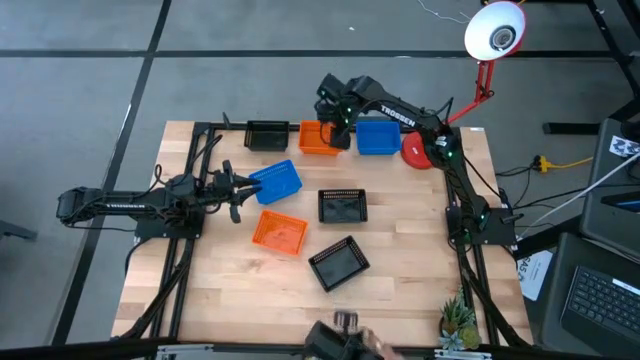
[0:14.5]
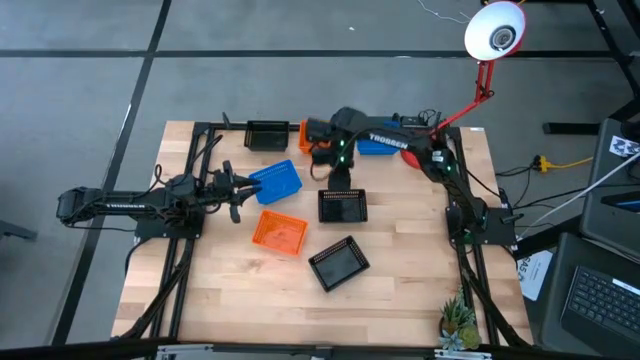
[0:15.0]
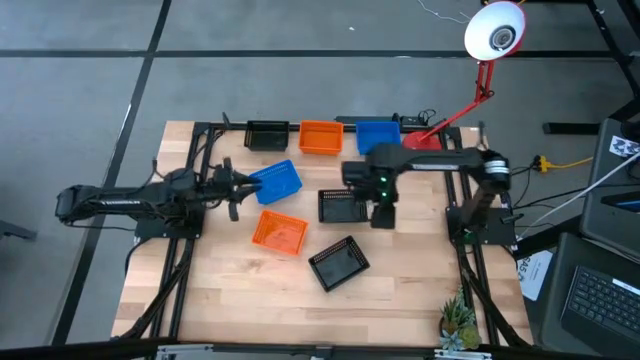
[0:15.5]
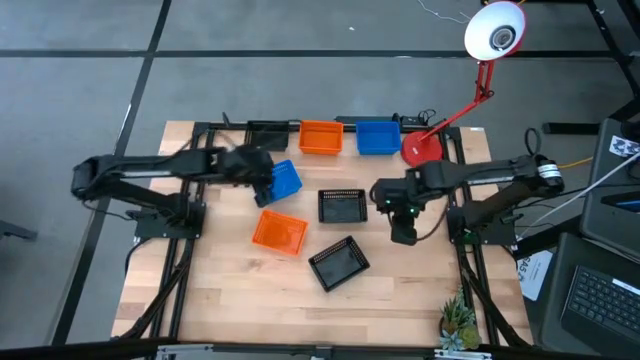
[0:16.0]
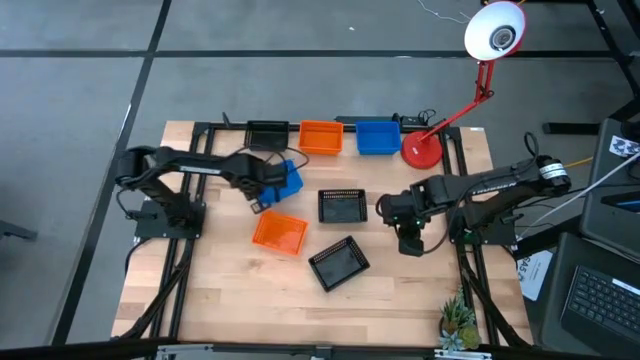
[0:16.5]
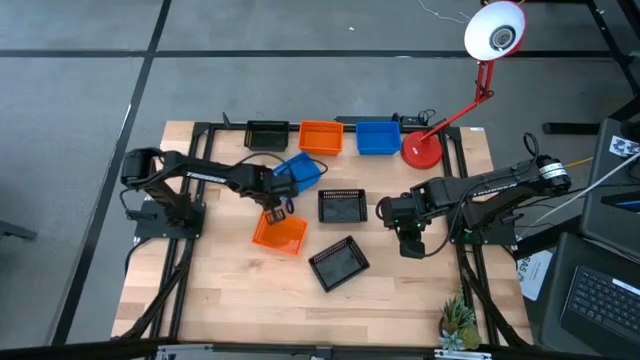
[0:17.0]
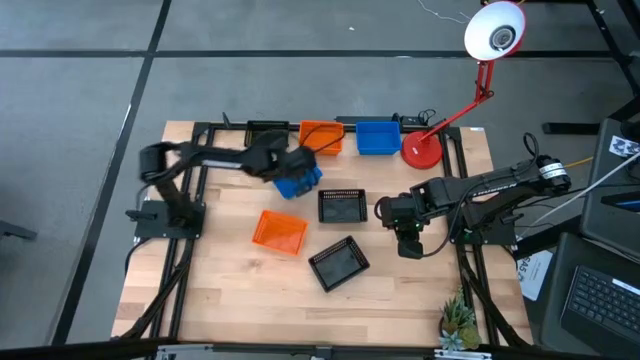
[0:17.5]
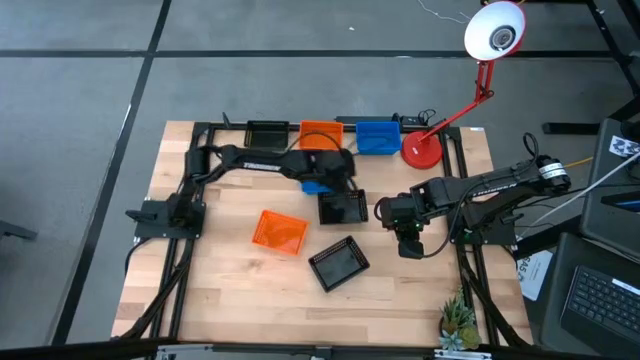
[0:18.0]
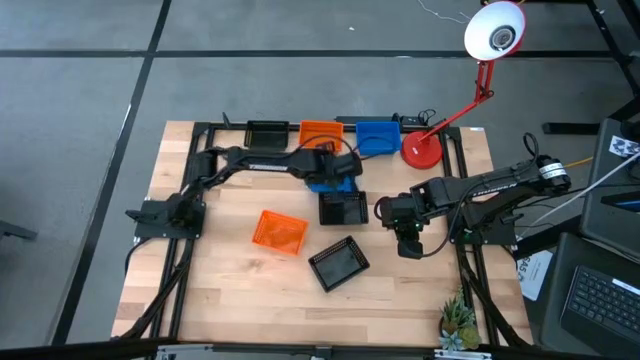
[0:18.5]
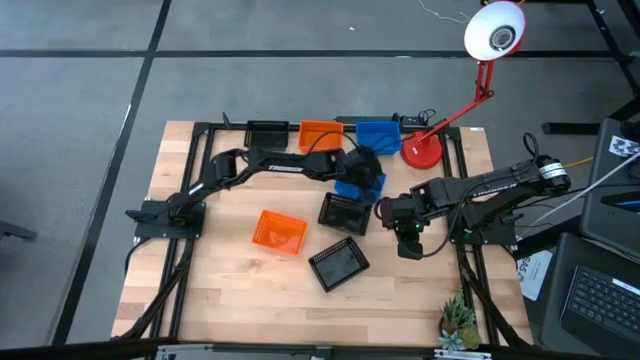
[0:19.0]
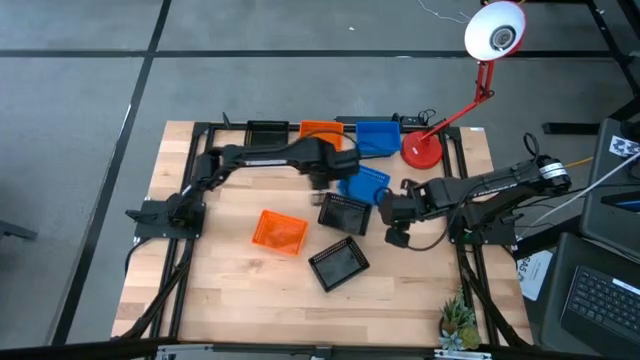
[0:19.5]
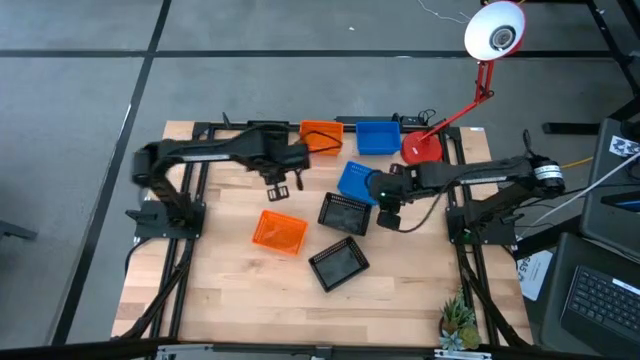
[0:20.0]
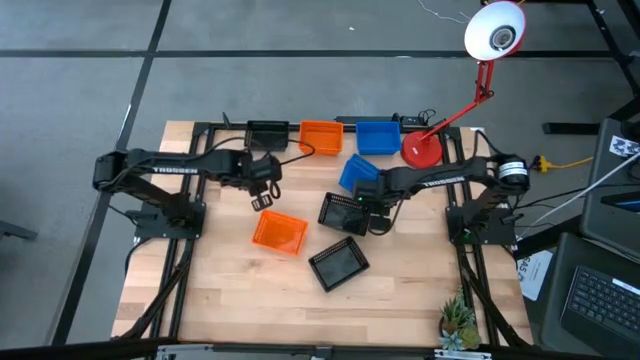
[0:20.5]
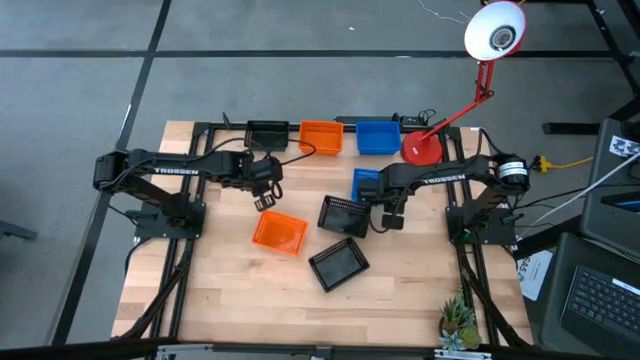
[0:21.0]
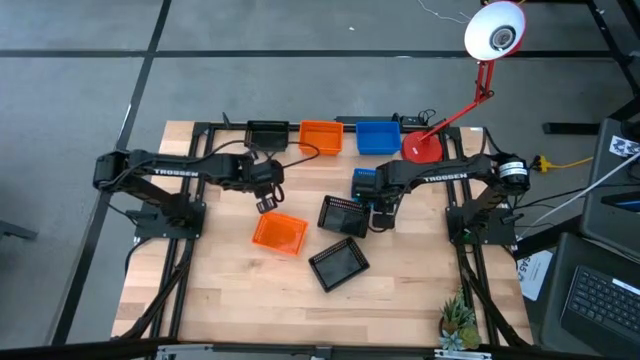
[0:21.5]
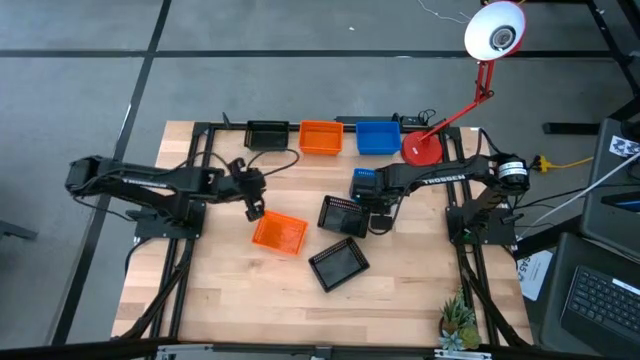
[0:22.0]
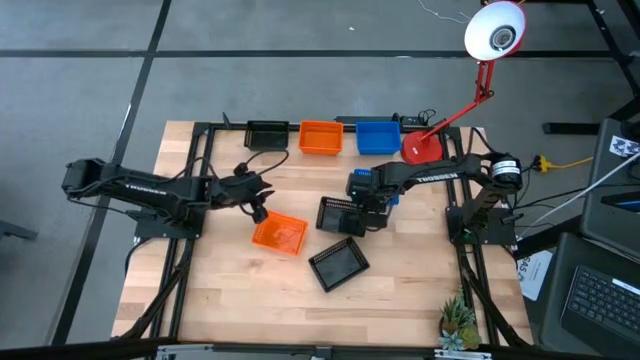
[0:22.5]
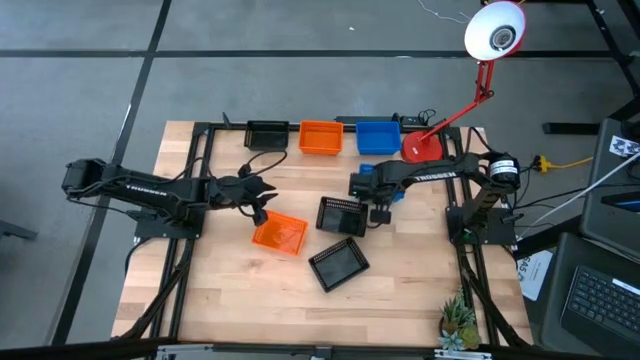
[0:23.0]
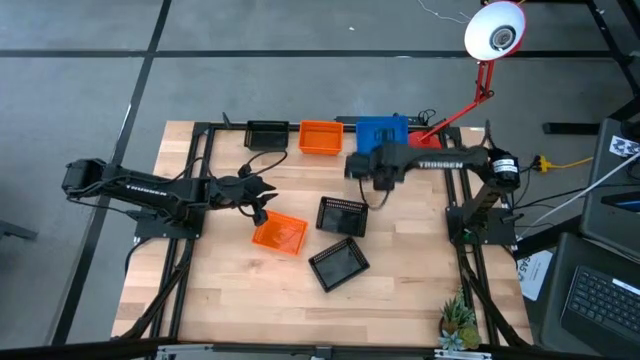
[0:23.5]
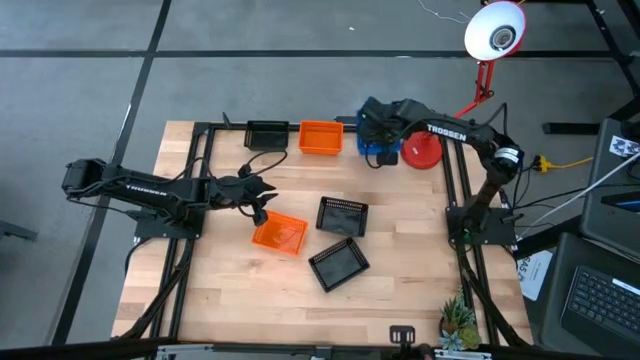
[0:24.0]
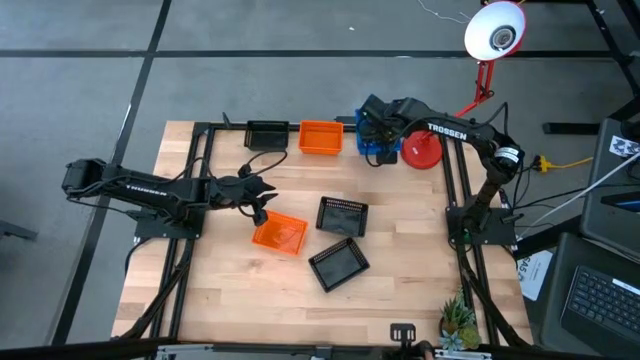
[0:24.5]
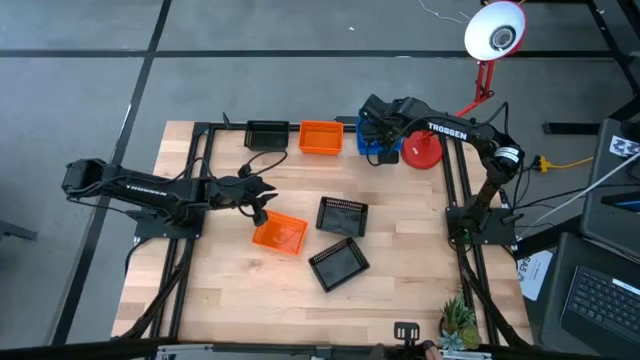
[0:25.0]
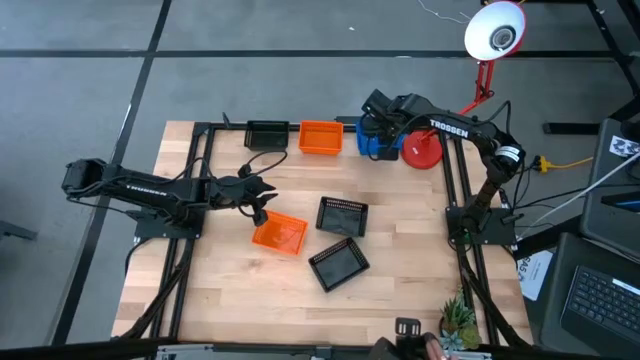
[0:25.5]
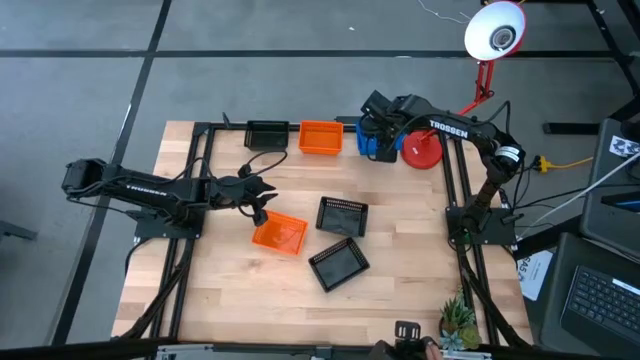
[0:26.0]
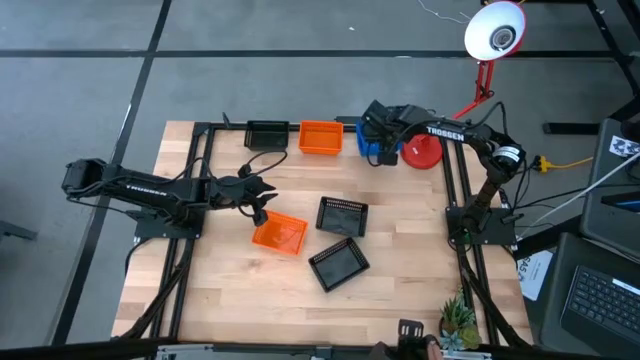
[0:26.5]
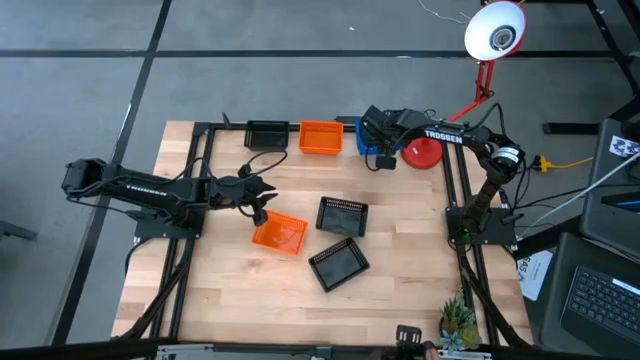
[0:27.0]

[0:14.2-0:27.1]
Stack the left blue basket on top of the top blue basket

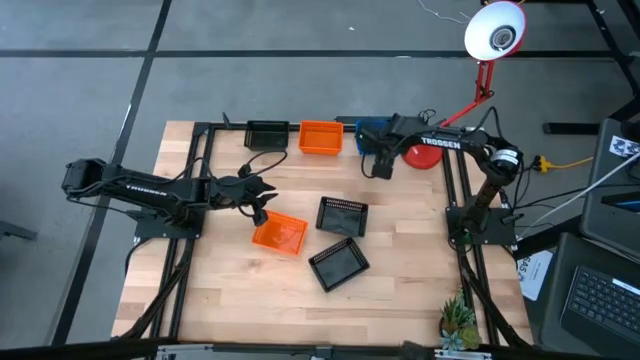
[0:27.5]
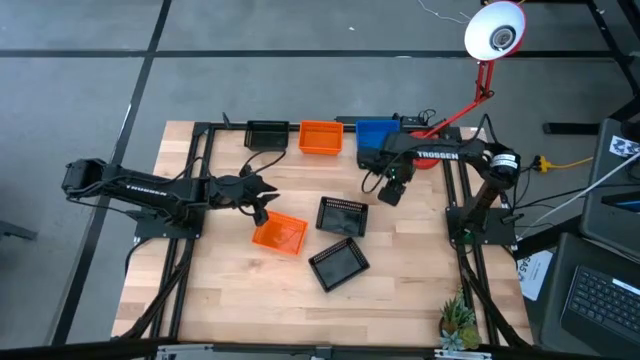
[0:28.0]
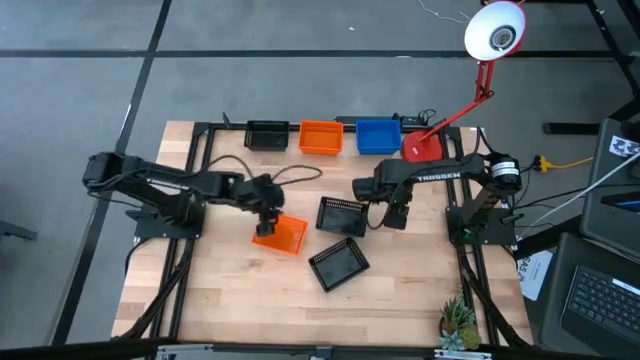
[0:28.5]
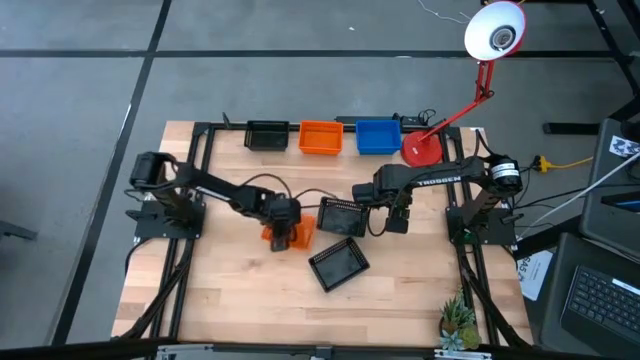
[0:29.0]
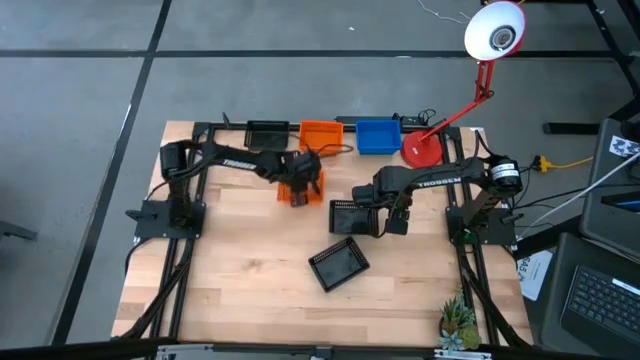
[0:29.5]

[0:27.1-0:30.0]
Move the bottom orange basket to the top of the table

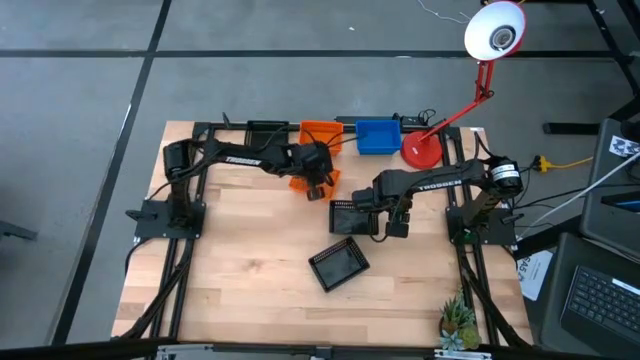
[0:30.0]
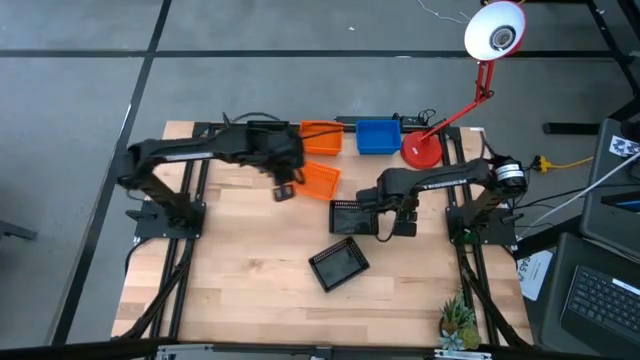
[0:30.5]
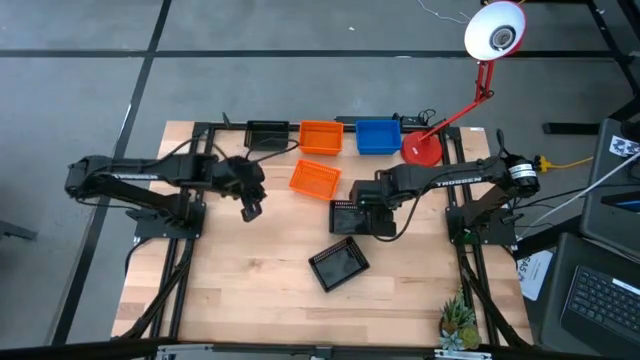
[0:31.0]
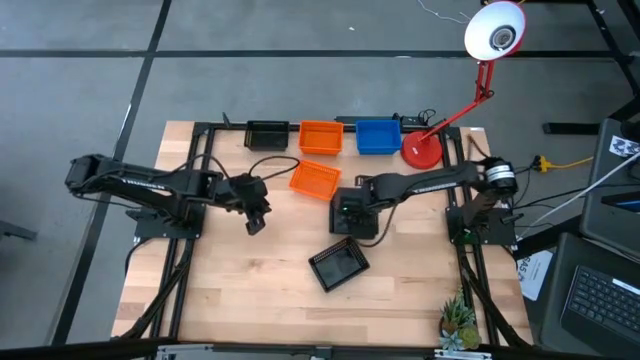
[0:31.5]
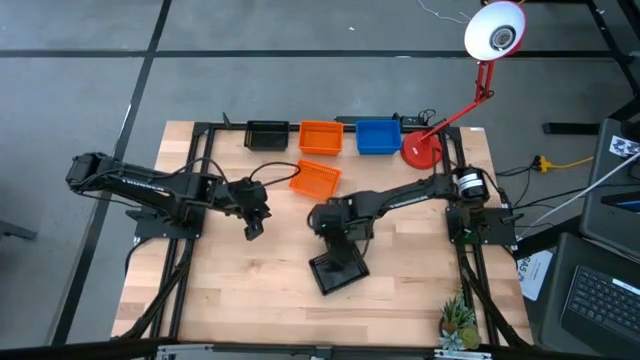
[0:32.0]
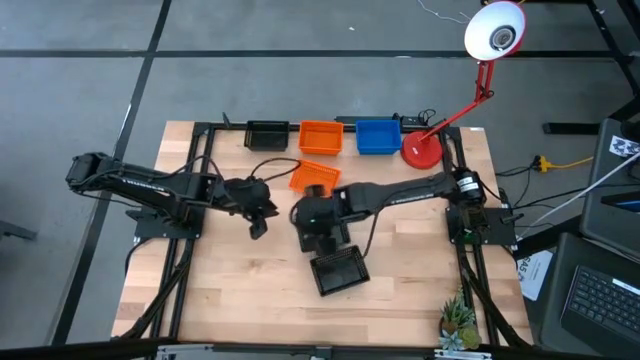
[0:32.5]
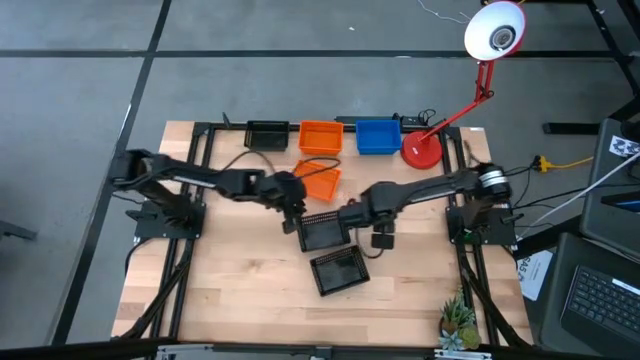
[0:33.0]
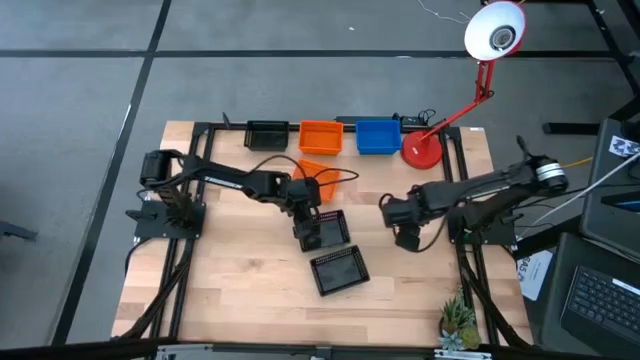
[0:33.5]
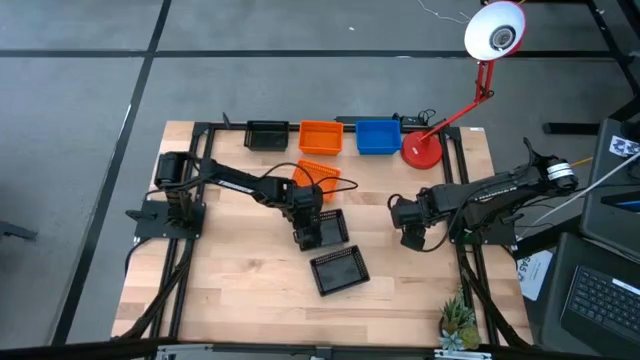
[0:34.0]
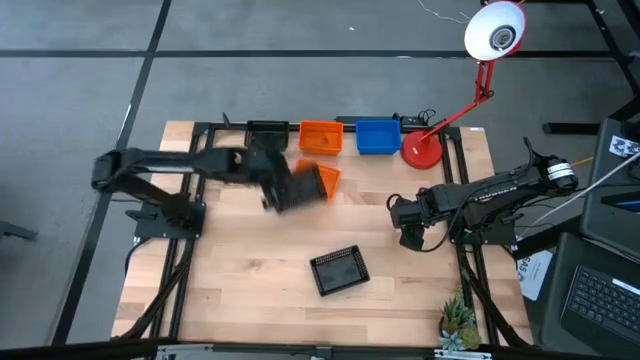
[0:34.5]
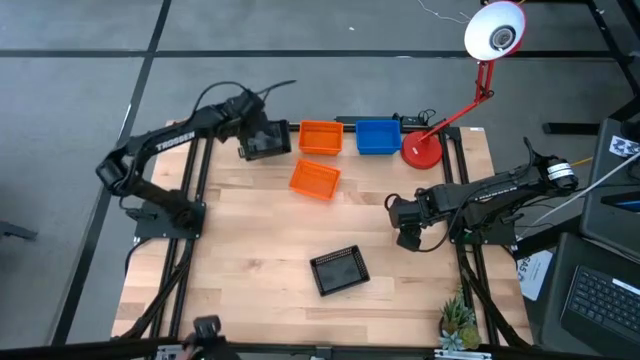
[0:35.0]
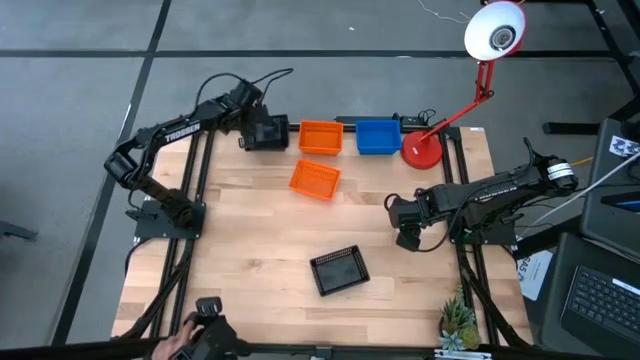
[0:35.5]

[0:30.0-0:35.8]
Stack the middle black basket on top of the top black basket
